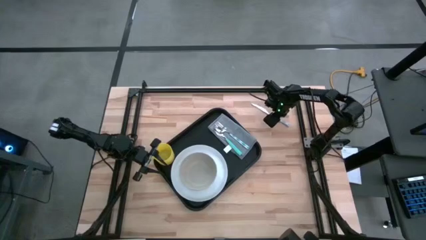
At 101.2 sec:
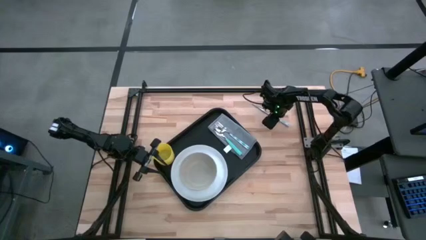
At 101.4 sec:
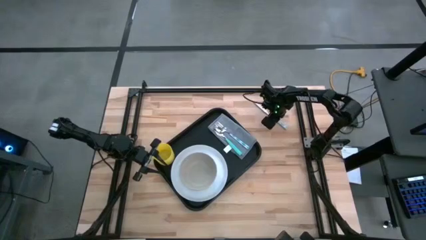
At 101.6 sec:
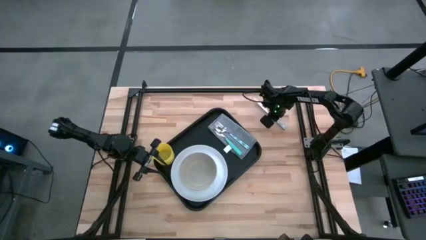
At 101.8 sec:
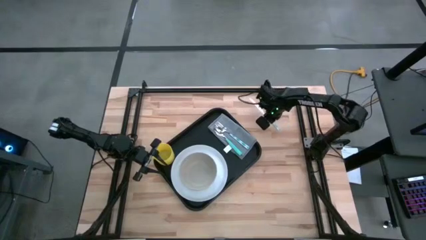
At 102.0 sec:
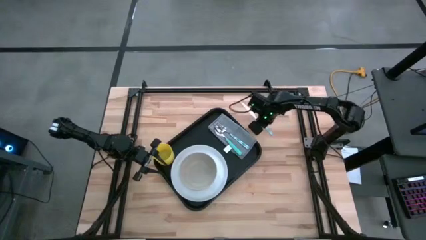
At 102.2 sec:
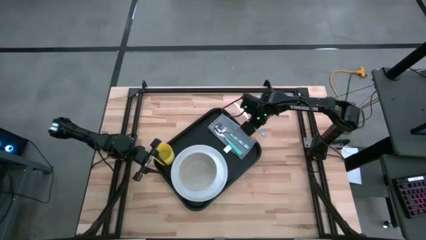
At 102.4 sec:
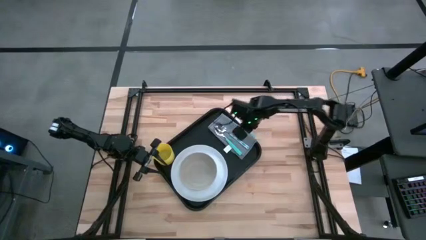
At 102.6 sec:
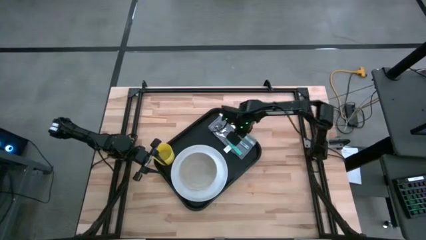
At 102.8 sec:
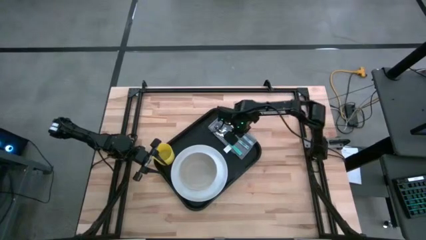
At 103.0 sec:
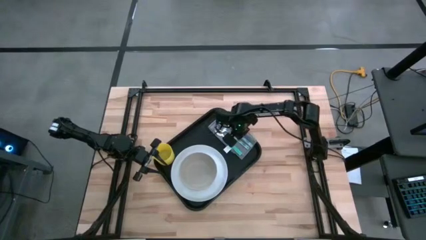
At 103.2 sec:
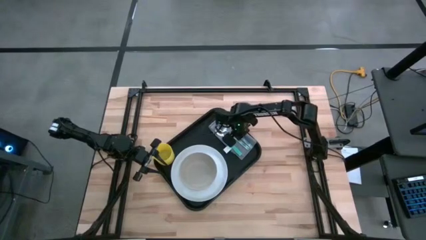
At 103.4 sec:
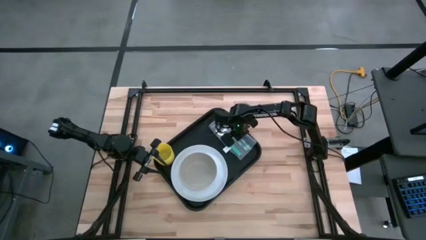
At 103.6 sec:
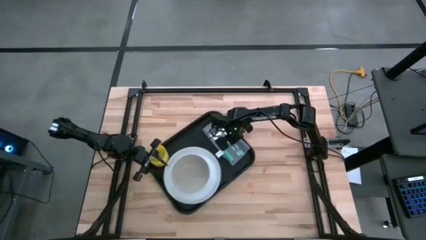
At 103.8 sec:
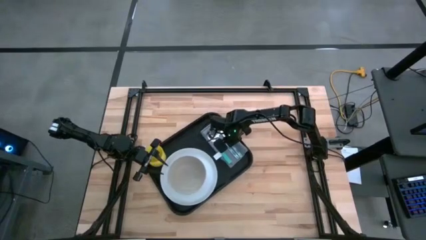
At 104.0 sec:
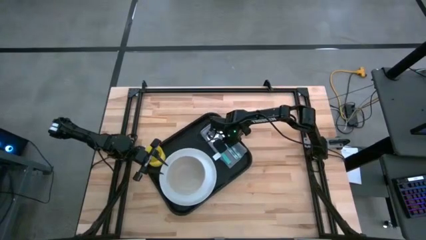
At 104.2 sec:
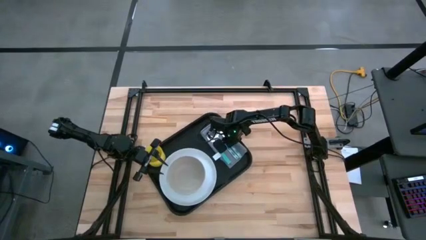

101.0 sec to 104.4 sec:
Task: Set up tray
Put the blue patterned knife on top of the gray napkin on the black tray to the right of the blue patterned fork

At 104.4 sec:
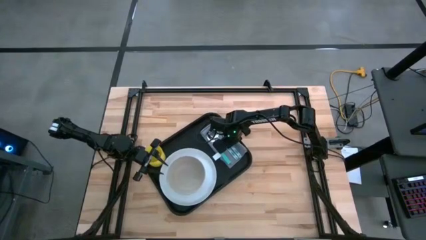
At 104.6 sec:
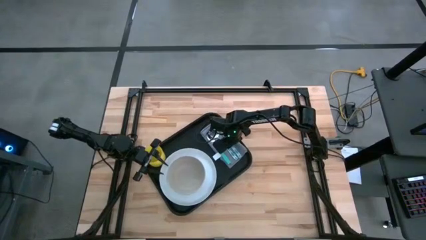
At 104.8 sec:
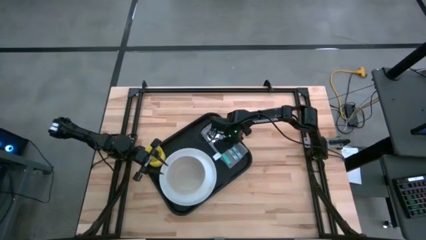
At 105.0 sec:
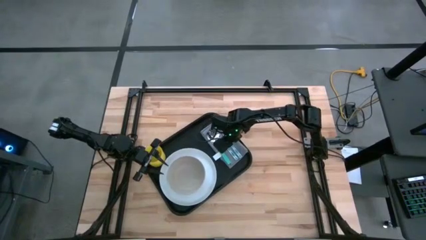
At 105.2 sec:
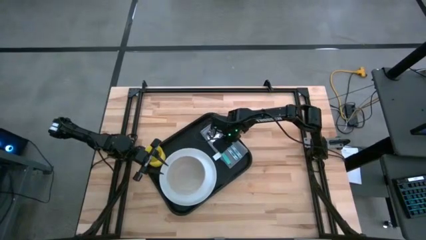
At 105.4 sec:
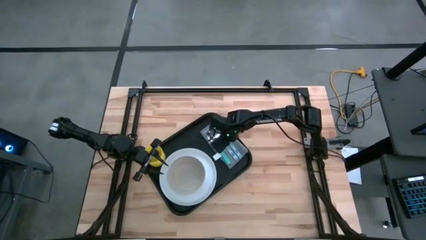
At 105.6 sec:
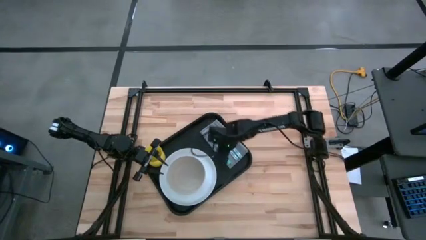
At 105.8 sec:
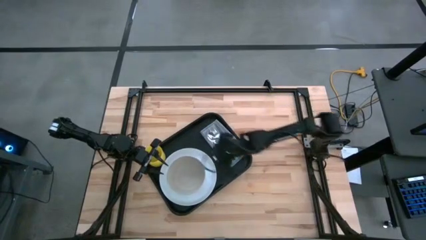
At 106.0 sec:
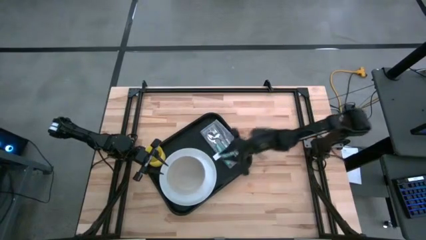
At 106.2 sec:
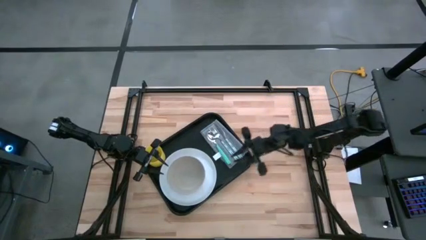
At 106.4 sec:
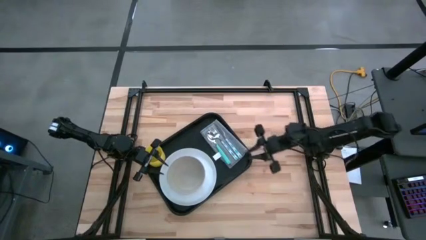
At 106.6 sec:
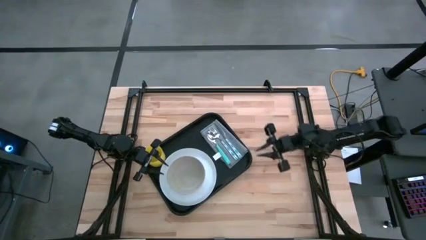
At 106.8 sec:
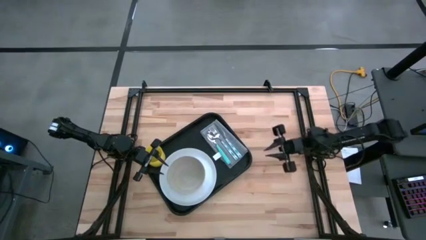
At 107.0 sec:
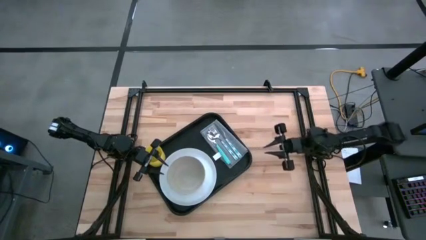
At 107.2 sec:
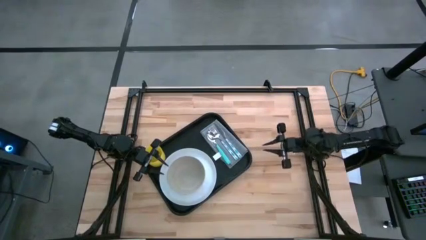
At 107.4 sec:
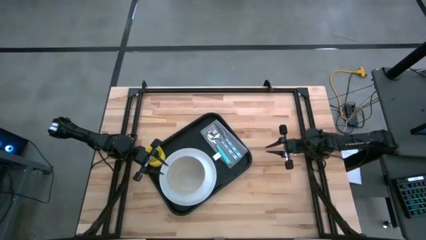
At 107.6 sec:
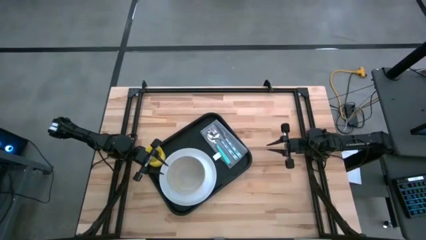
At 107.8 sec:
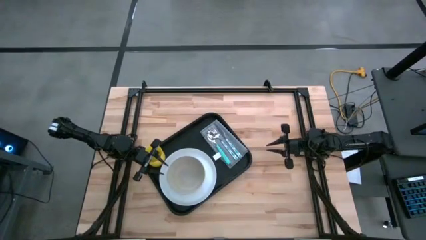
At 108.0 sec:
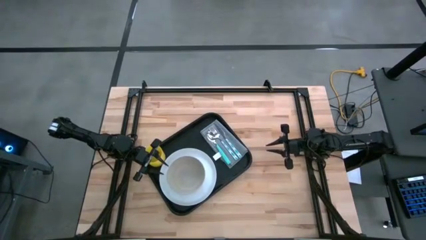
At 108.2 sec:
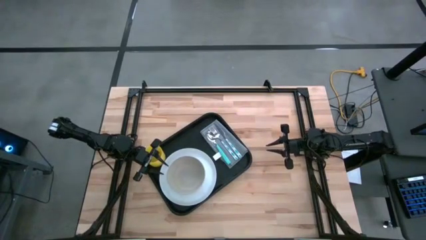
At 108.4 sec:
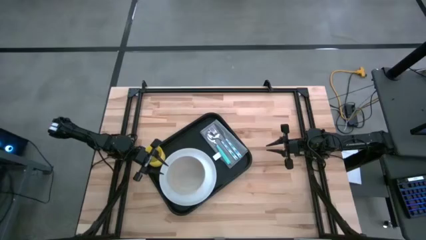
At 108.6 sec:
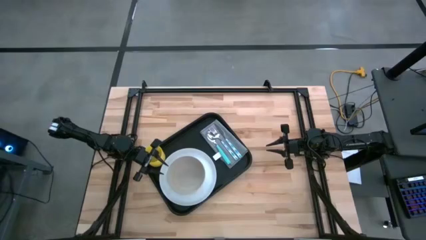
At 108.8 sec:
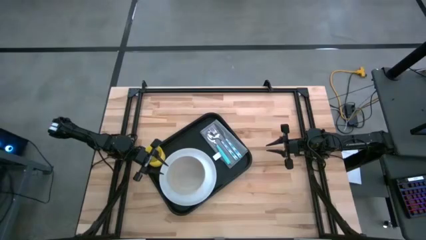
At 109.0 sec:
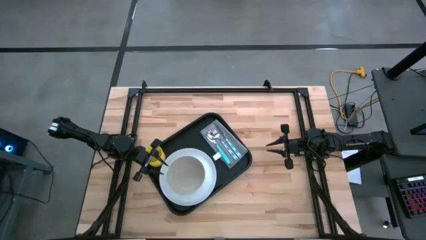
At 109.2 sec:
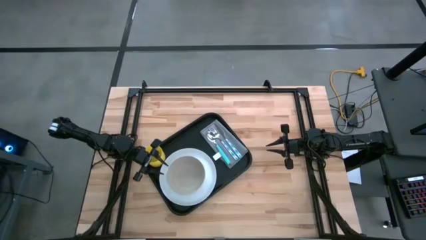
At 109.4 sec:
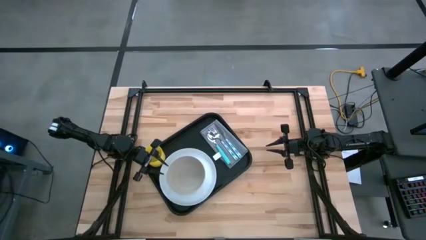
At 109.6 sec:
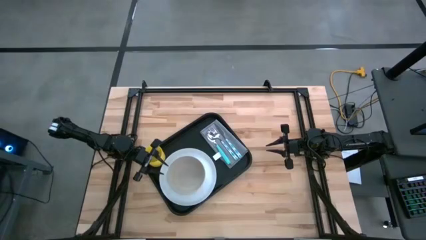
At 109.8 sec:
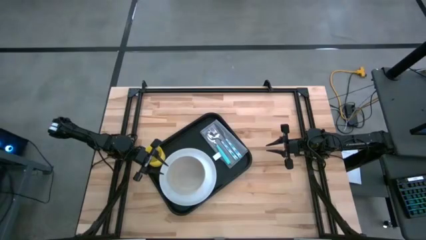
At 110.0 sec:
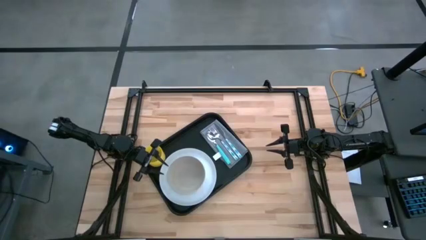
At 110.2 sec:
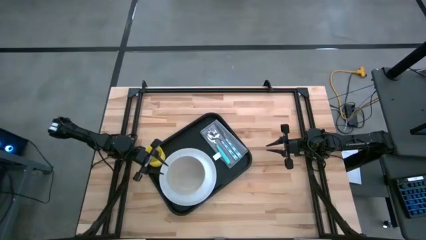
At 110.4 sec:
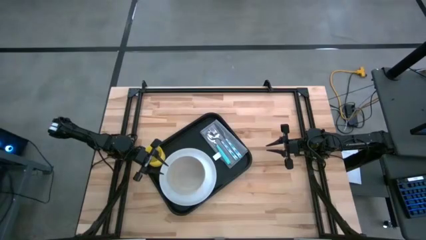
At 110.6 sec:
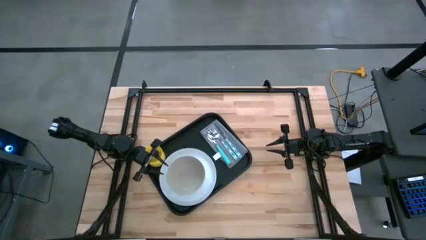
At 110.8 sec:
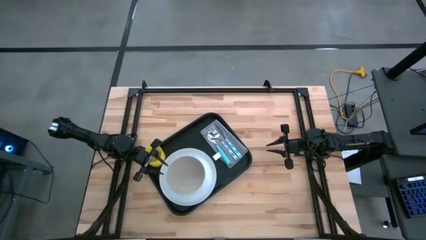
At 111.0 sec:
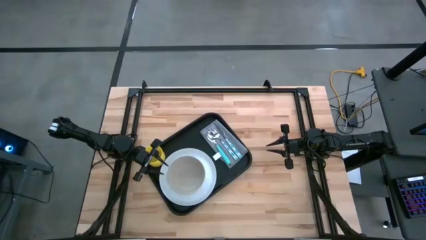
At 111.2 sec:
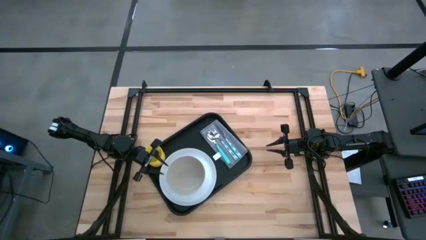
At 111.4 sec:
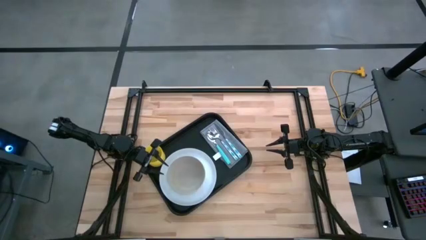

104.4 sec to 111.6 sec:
Return to Home Position

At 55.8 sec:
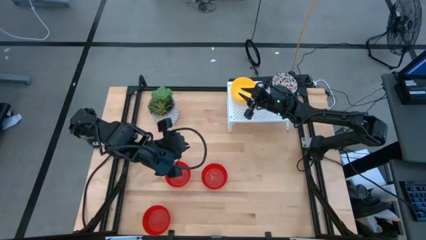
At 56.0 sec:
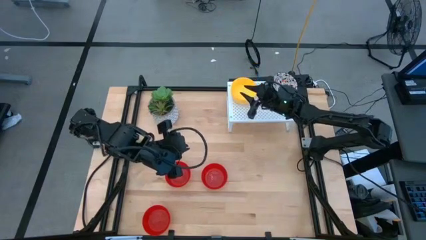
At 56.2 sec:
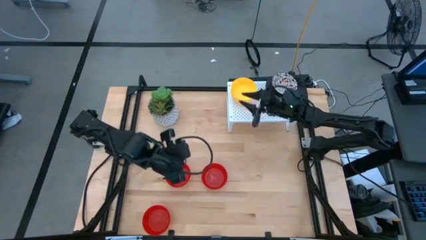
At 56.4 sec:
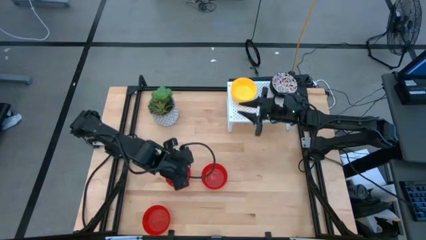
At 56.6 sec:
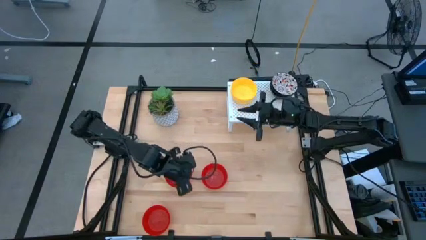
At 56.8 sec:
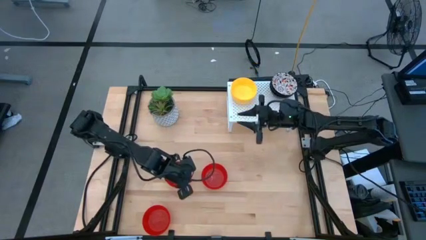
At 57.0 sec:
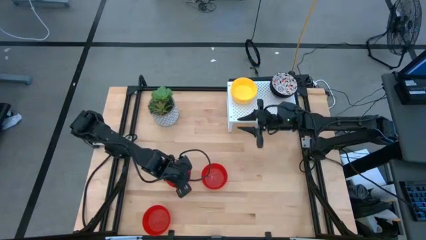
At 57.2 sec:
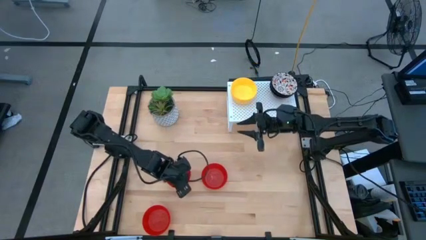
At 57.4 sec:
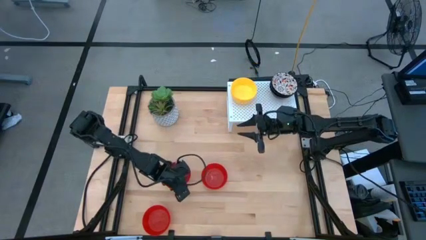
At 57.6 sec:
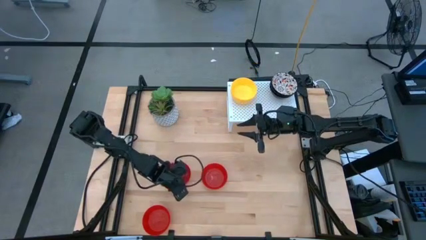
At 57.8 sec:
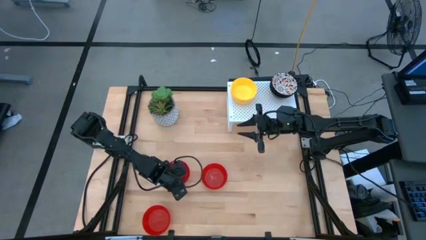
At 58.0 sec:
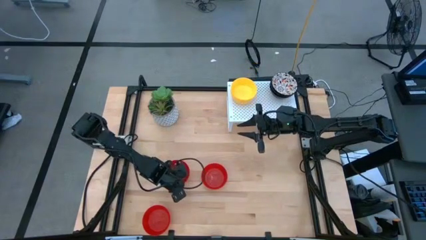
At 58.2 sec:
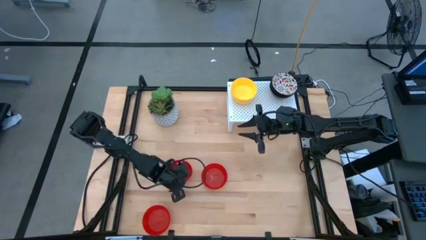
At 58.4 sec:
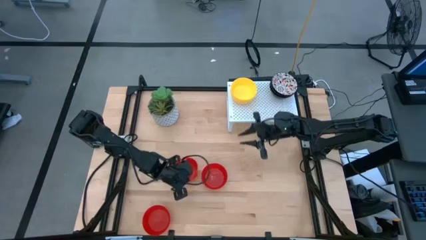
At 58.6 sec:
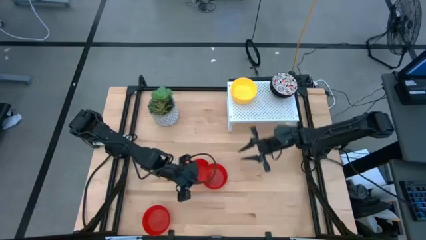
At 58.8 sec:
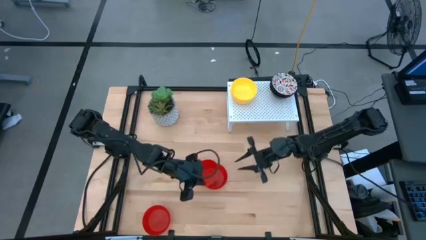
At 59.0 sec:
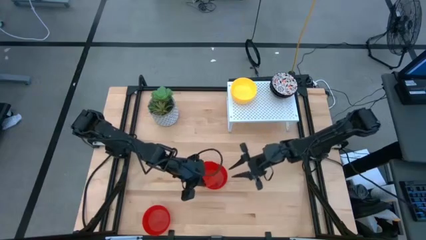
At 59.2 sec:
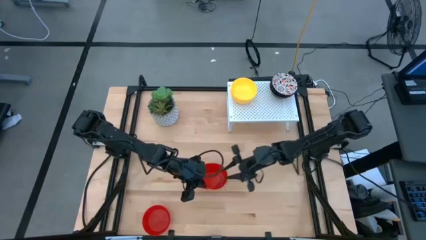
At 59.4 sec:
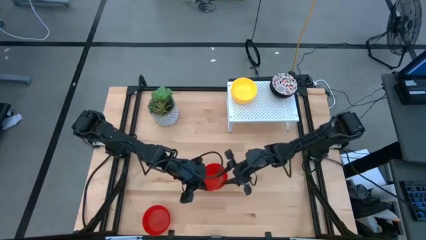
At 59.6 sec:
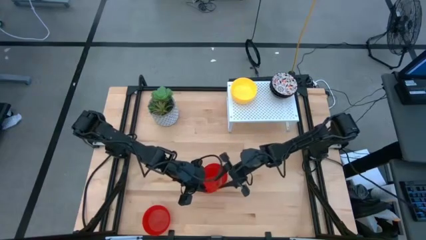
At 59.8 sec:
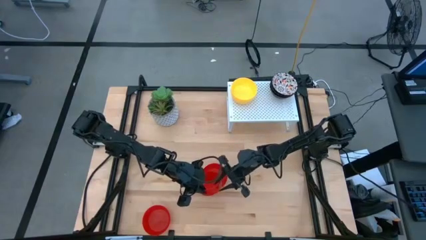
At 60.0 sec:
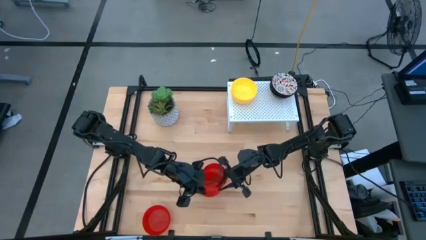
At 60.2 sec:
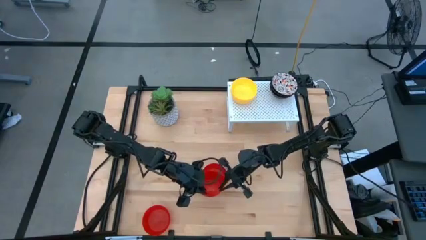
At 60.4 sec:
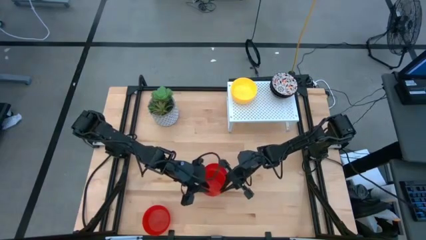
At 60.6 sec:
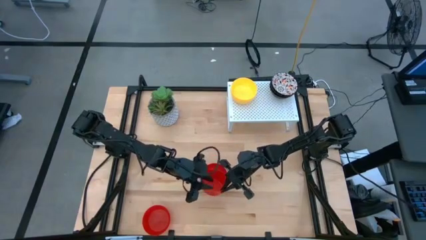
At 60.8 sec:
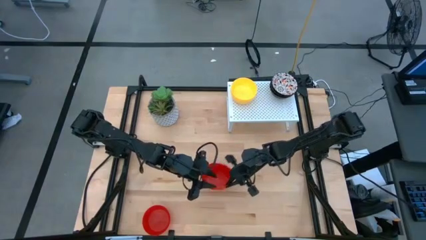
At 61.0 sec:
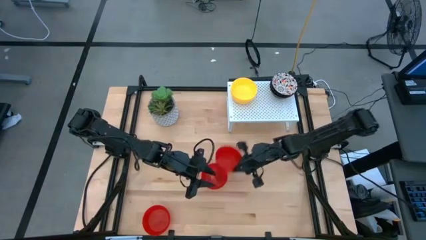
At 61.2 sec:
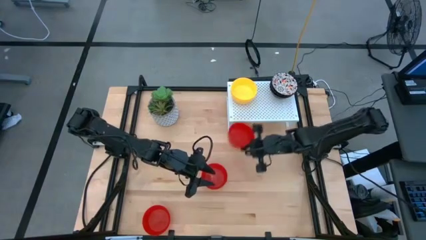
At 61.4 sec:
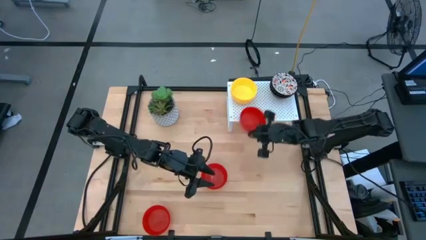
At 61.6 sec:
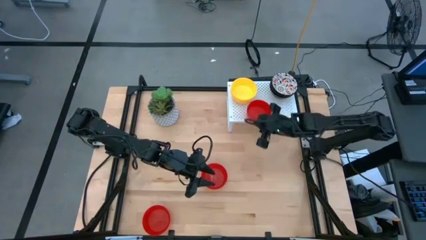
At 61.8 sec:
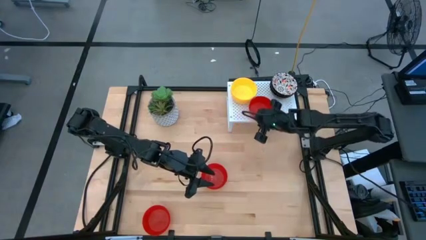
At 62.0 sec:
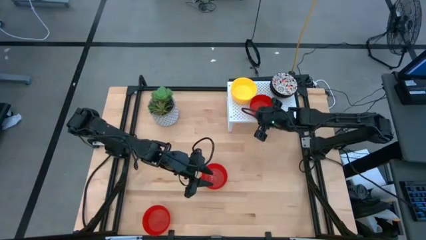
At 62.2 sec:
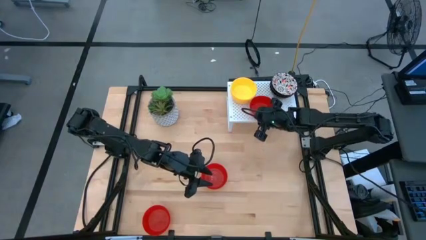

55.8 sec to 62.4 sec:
Task: Pick & Place Mini bowls
Put the red bowl on the shelf
